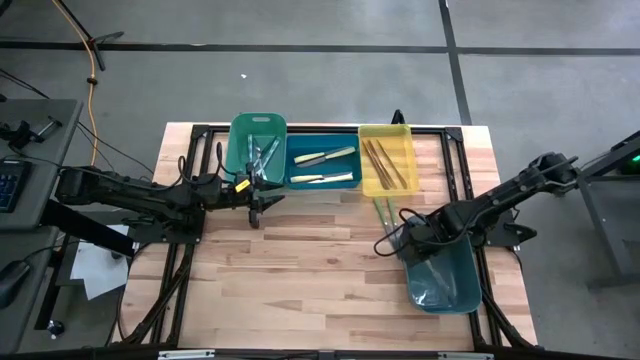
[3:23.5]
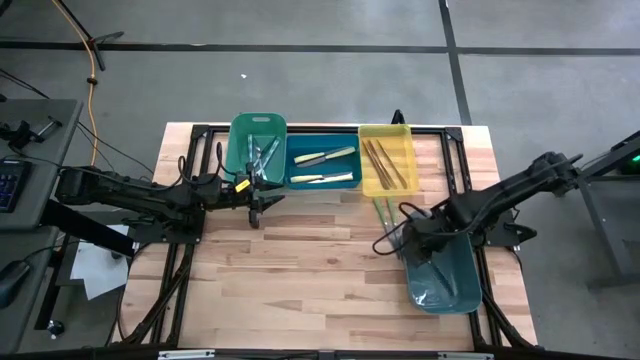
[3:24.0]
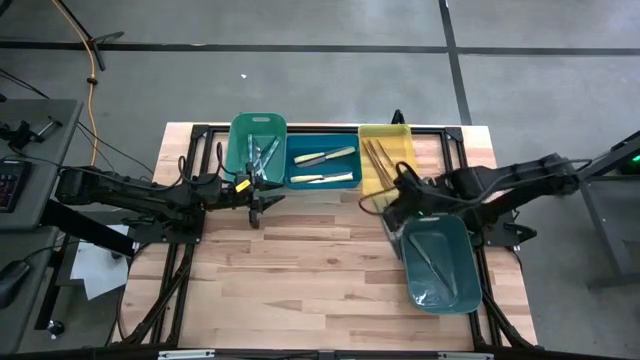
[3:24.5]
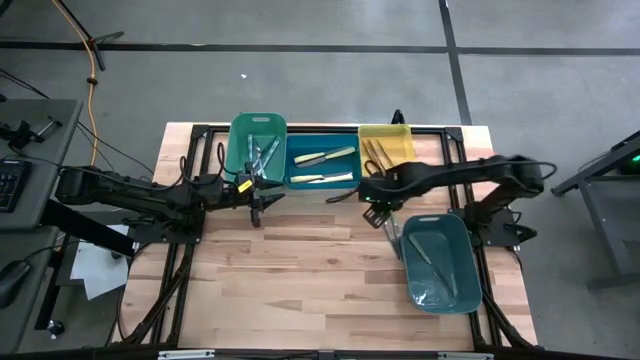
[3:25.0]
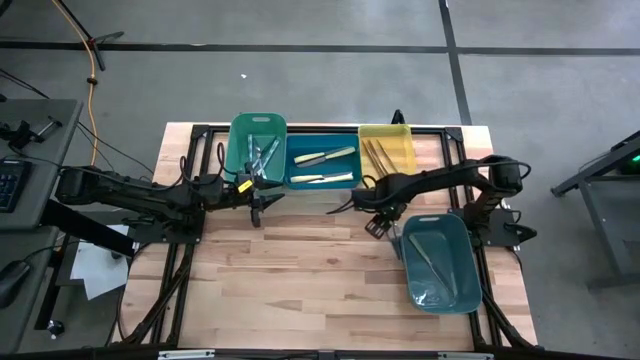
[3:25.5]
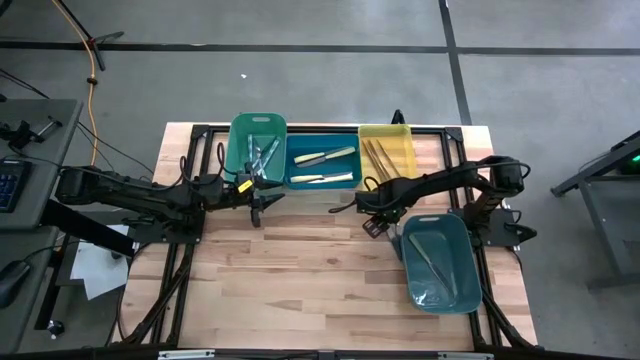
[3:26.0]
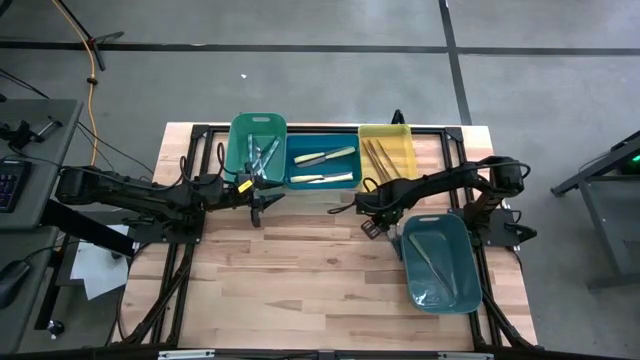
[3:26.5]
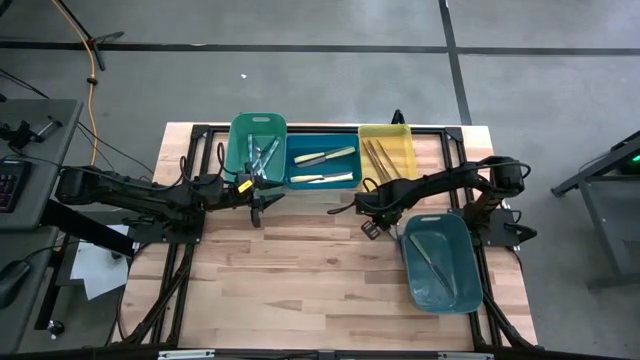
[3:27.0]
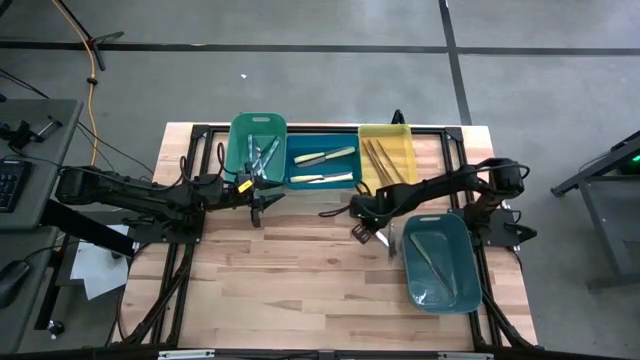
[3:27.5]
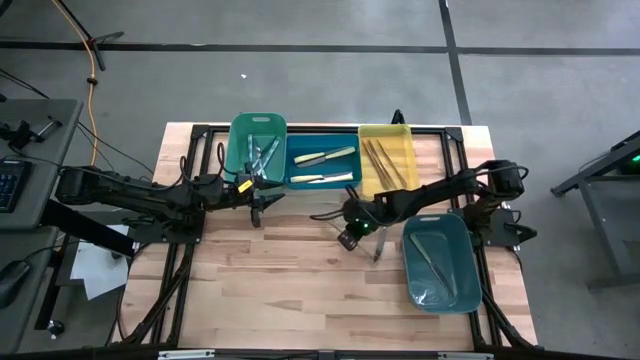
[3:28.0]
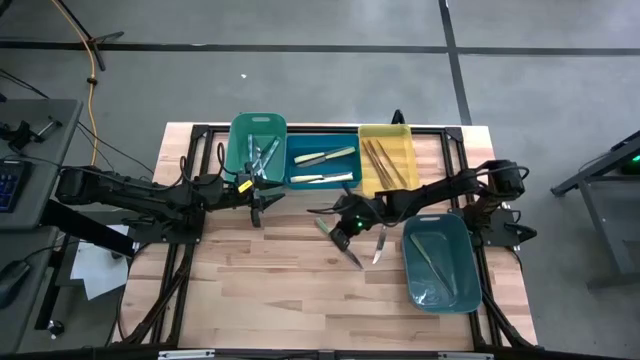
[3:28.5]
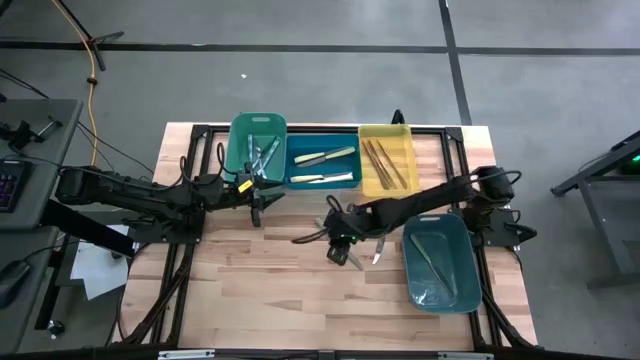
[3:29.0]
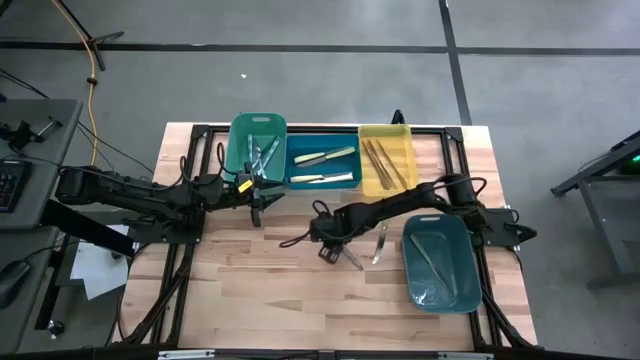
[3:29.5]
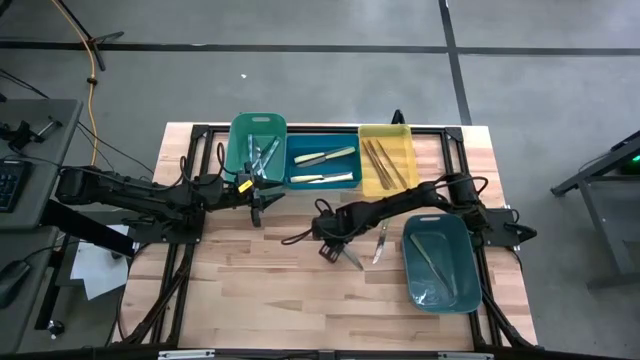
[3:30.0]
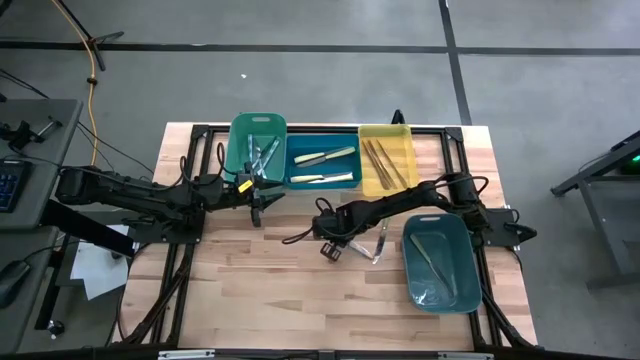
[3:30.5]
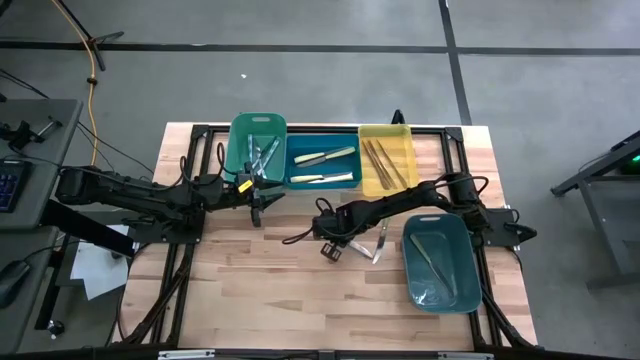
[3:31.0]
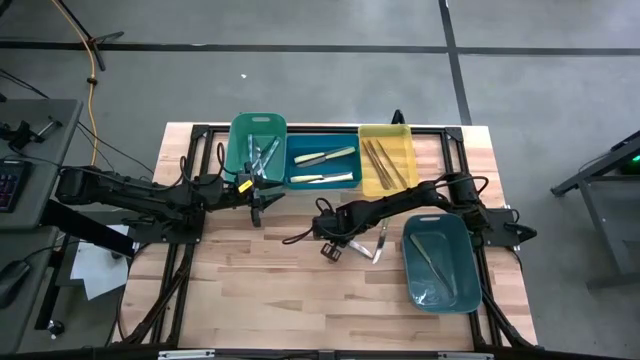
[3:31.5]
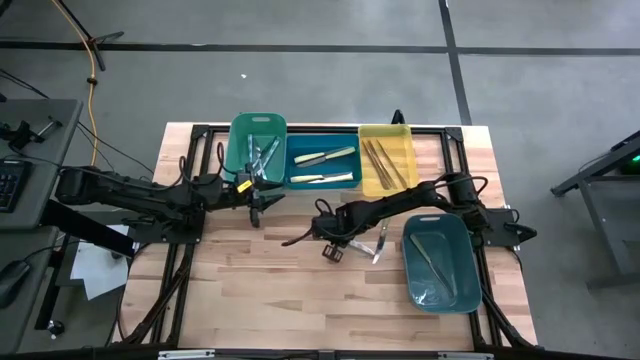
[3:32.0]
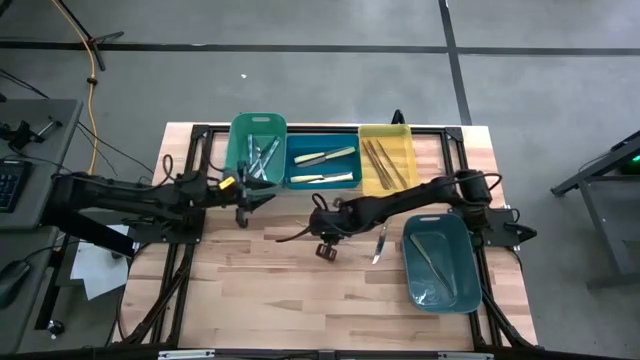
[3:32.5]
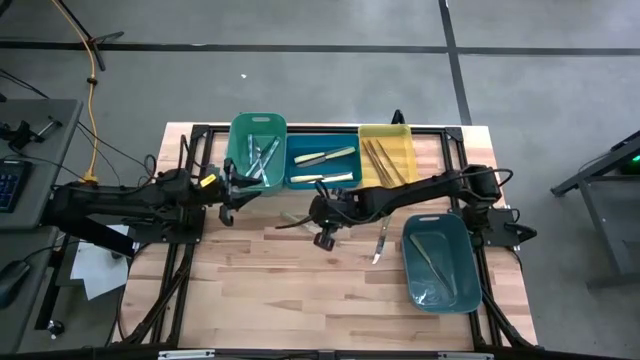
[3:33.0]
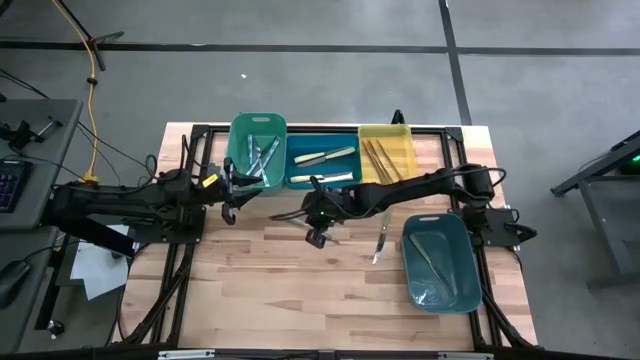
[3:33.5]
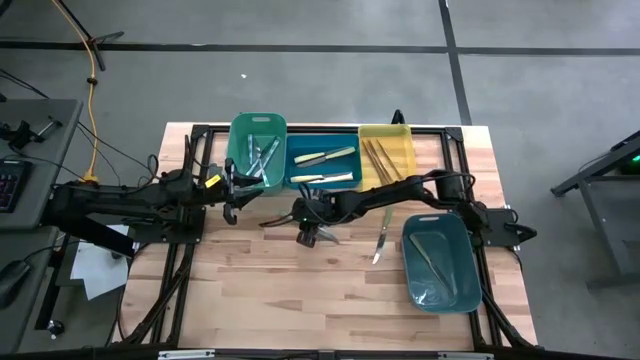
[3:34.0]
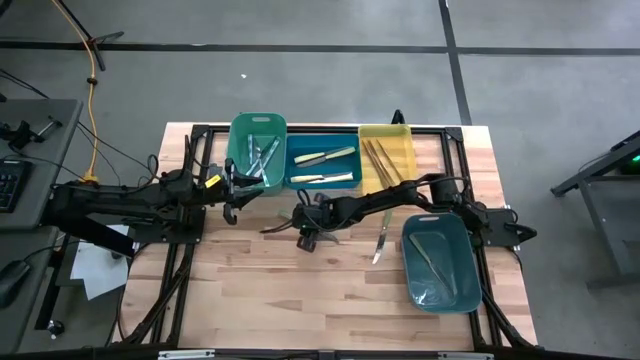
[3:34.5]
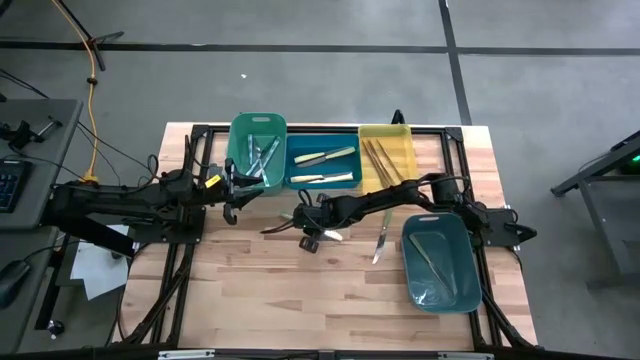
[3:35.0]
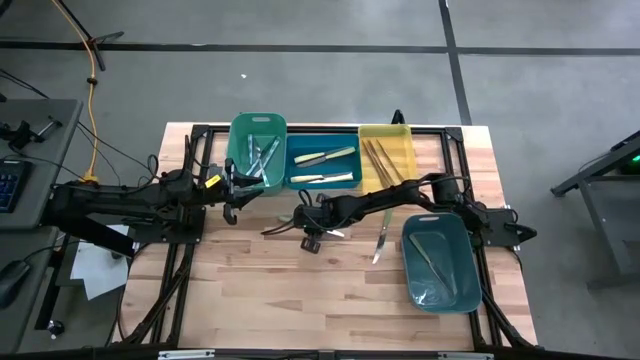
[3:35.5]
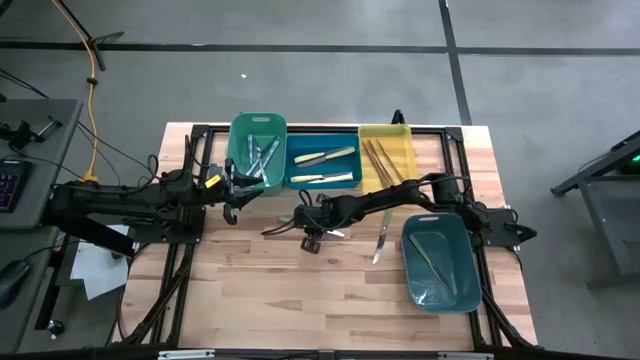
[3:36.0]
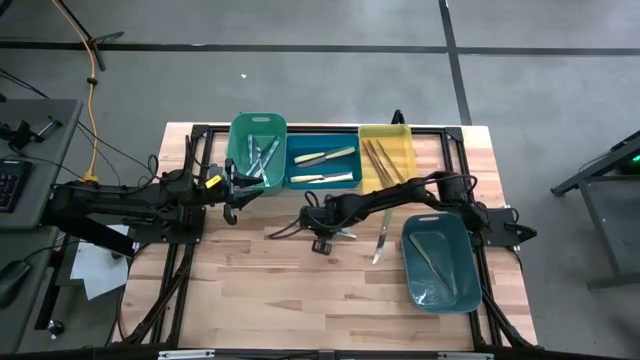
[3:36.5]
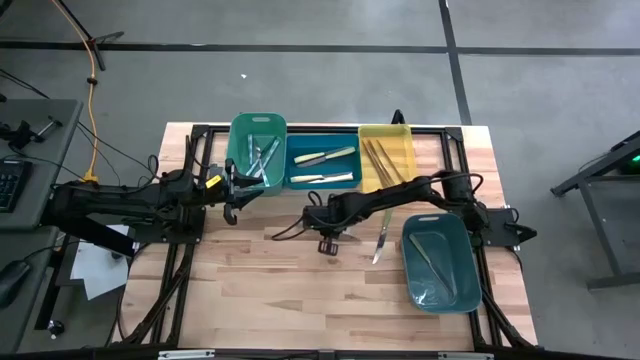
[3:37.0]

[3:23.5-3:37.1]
Task: Sort silverware by color (type)
Put the green knife into the green bin
